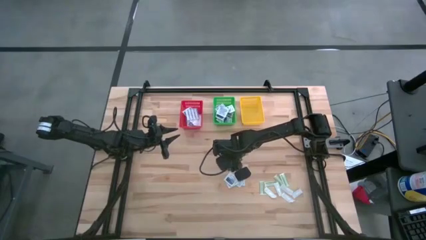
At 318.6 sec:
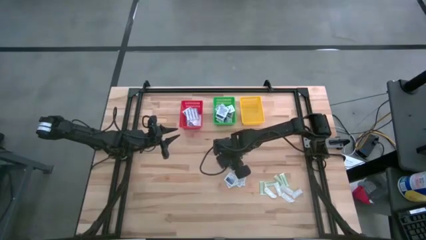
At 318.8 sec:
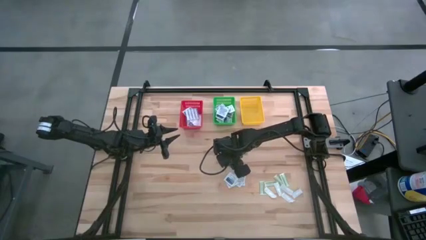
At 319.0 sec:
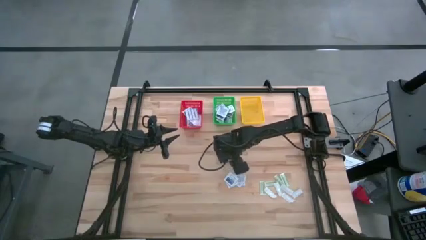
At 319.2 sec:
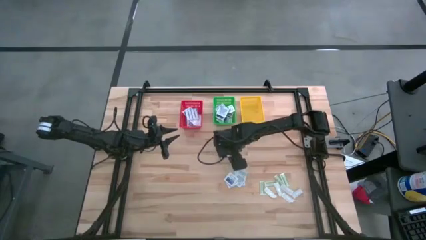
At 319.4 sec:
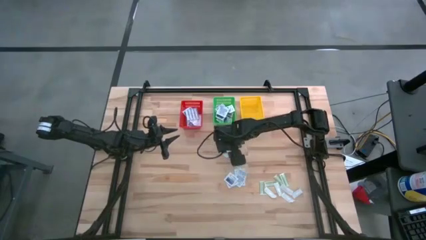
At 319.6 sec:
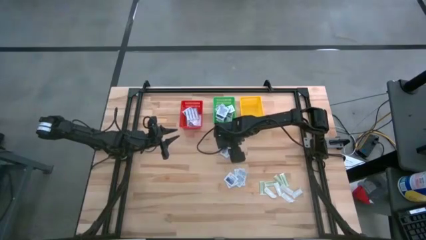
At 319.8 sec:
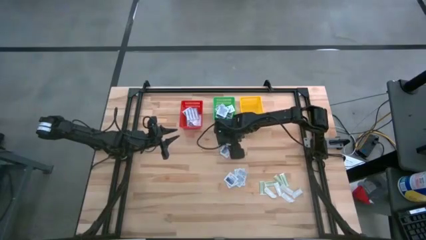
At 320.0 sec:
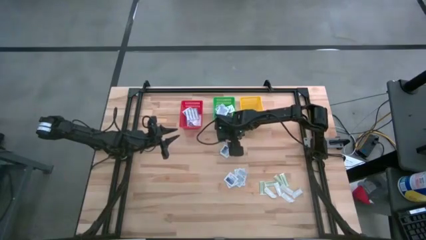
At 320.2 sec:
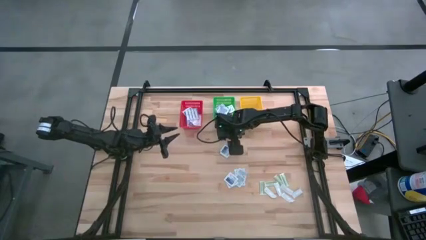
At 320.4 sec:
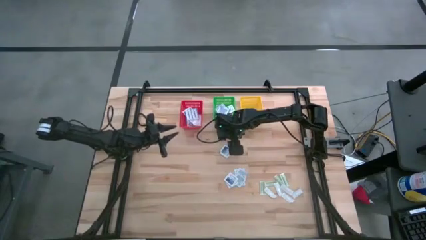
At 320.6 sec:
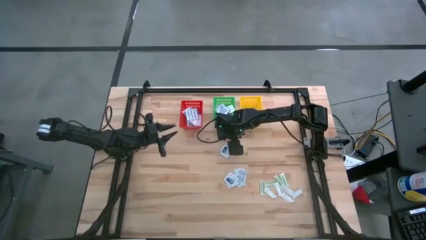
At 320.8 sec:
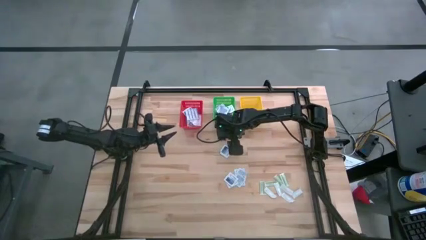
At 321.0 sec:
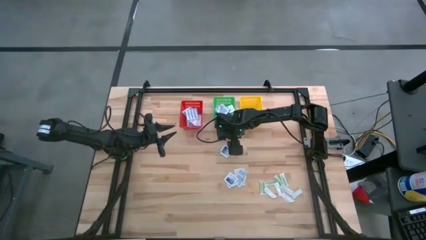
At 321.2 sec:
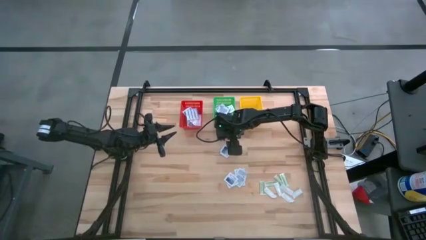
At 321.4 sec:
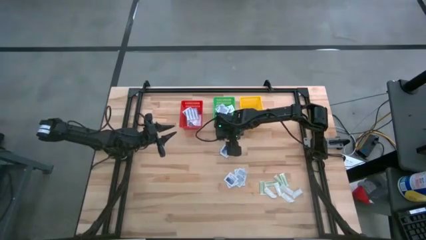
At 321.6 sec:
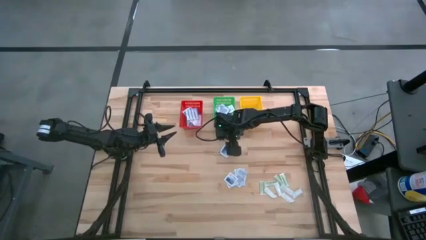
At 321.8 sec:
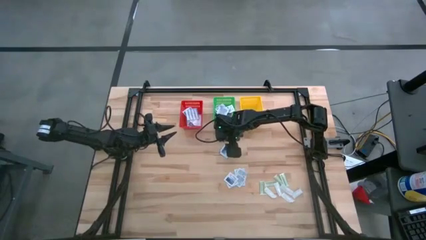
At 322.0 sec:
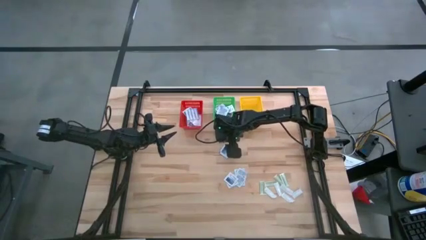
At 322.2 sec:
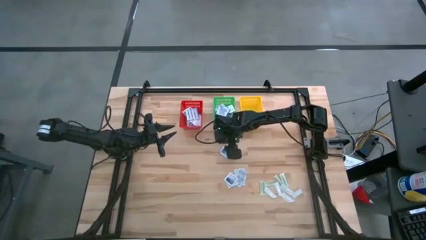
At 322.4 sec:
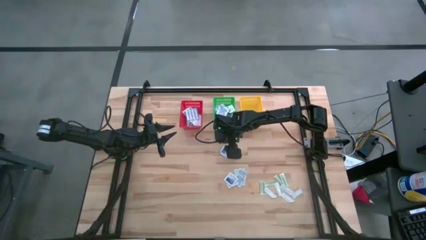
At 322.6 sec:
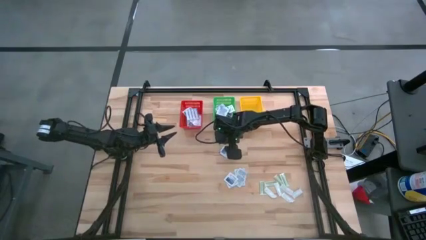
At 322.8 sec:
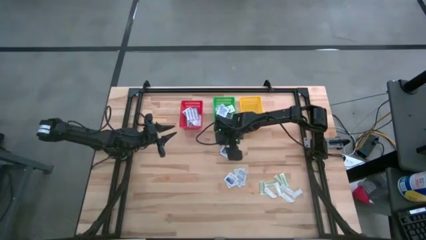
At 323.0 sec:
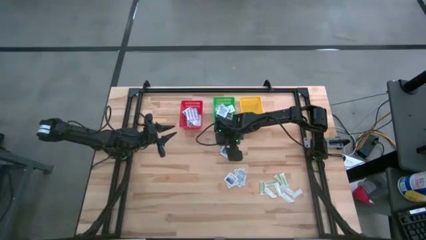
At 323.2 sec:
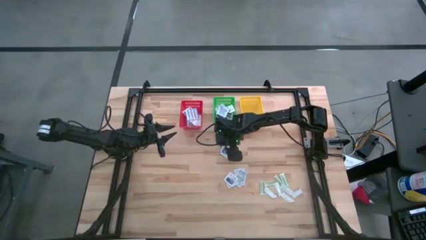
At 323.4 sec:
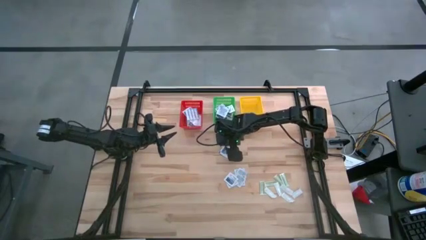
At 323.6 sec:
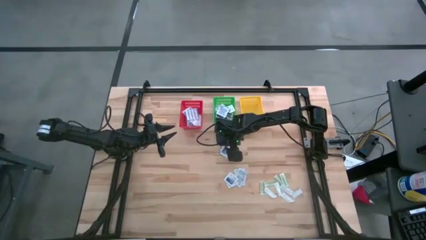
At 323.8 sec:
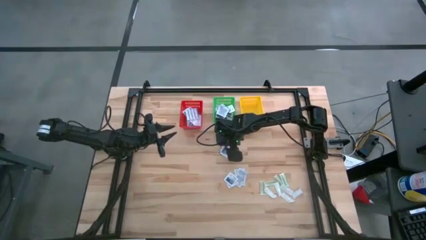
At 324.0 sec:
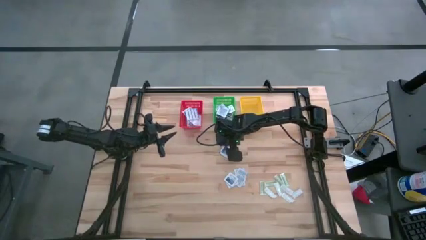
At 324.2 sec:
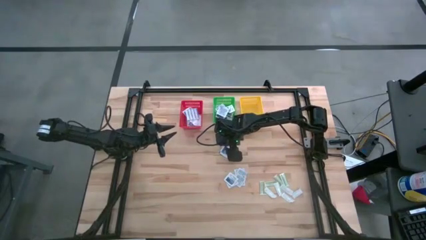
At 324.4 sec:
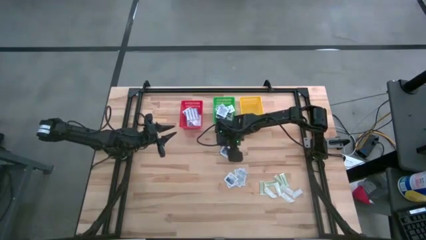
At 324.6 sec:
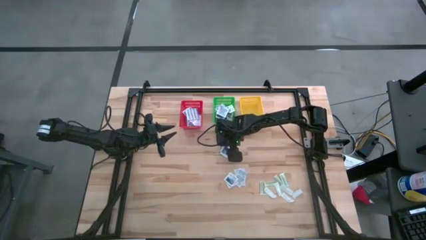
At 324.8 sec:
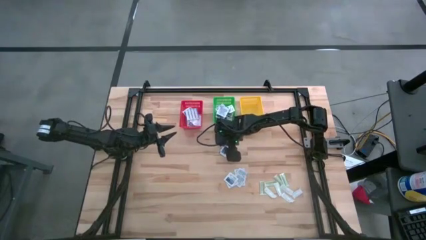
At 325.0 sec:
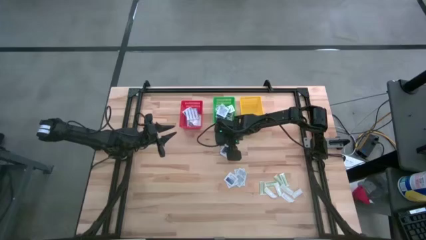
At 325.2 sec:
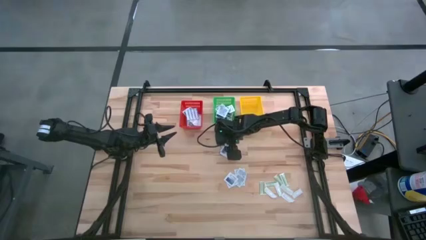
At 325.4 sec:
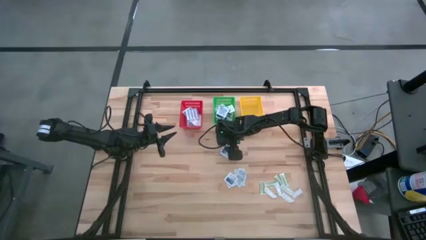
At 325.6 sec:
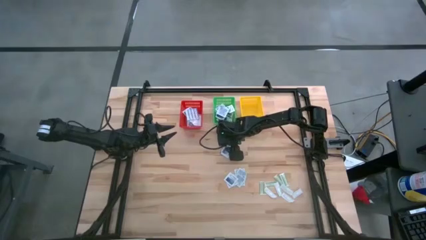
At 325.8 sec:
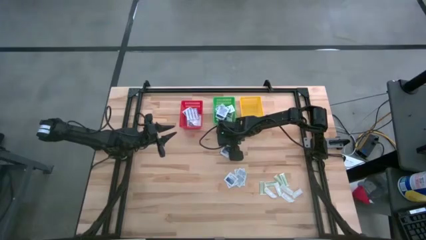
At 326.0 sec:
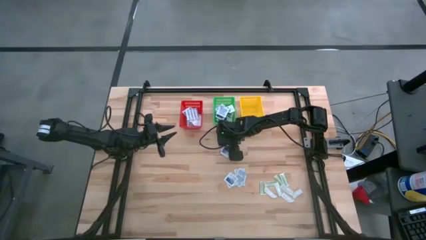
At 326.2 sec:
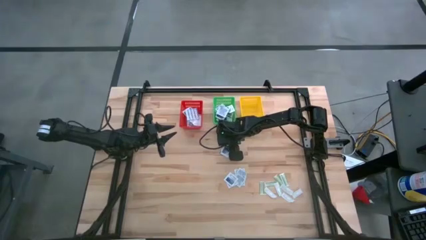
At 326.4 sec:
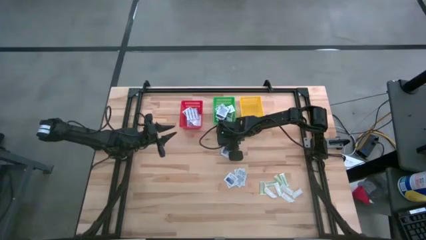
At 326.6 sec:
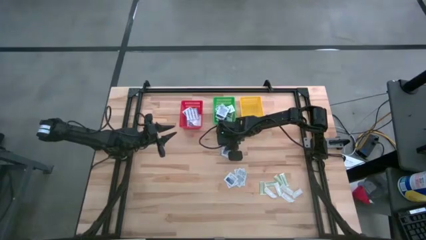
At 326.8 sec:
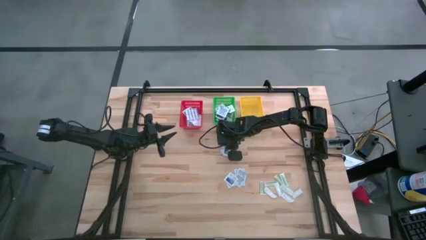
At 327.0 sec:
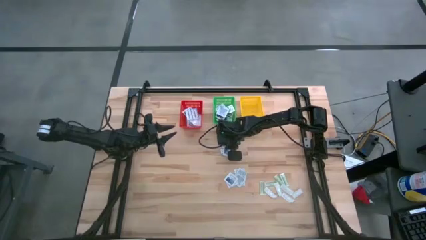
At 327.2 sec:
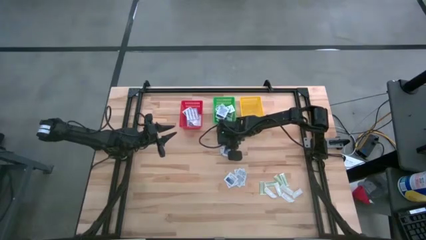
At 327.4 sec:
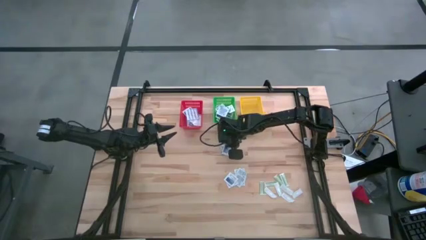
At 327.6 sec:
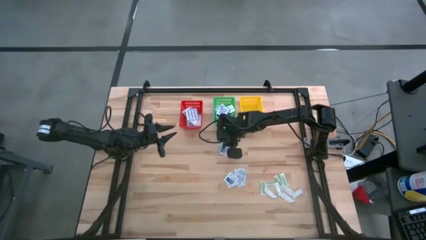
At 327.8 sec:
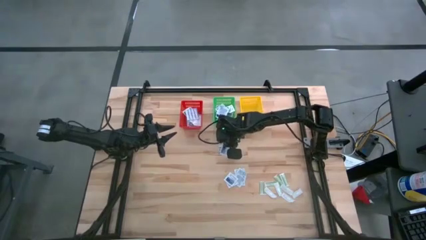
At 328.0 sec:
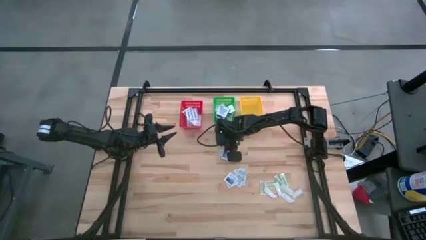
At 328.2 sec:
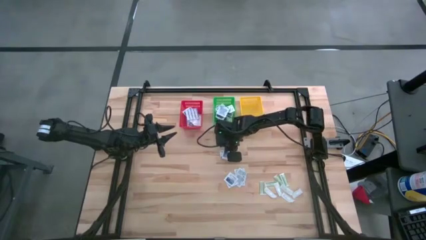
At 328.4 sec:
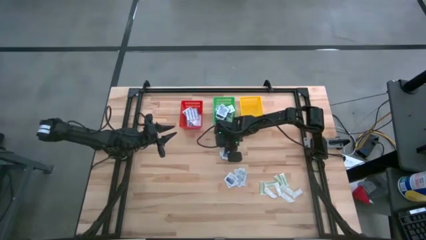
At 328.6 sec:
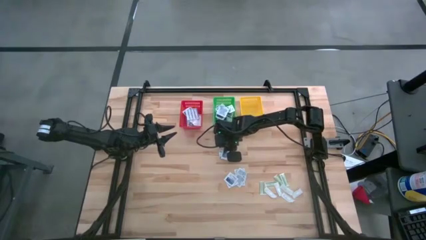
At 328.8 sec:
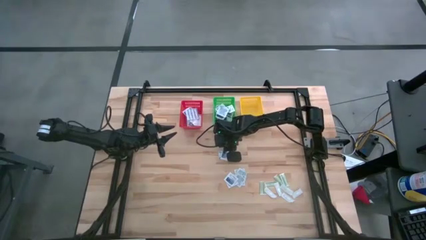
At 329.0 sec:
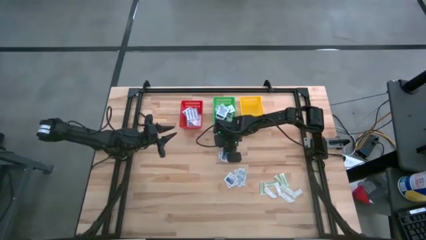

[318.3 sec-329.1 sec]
Task: Pick & Place First Aid Supplies
Put the alcohol pad into the green basket

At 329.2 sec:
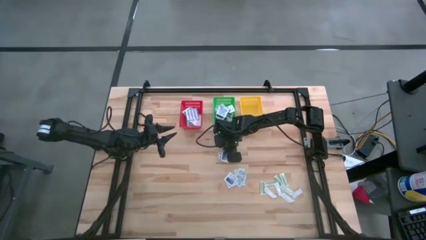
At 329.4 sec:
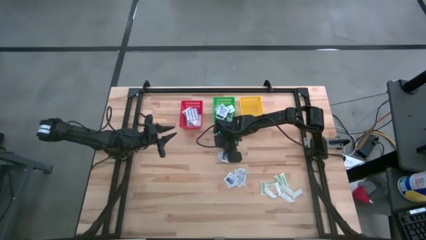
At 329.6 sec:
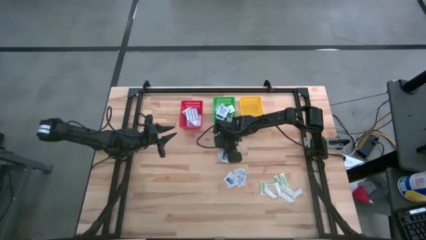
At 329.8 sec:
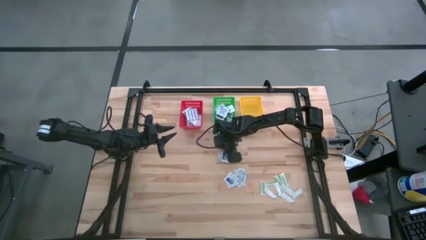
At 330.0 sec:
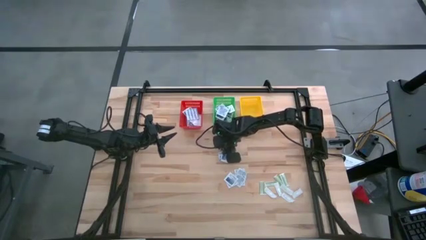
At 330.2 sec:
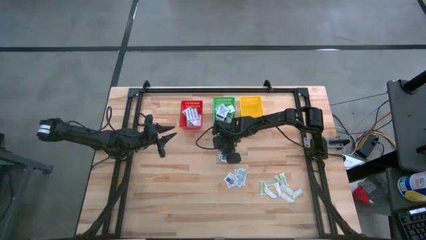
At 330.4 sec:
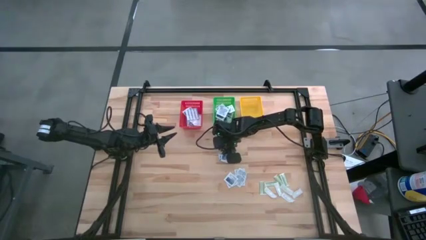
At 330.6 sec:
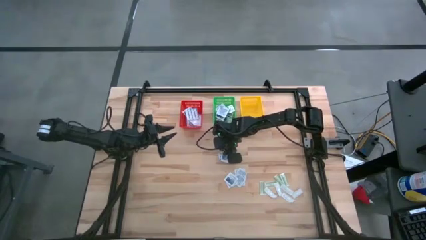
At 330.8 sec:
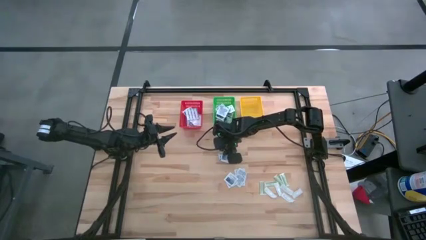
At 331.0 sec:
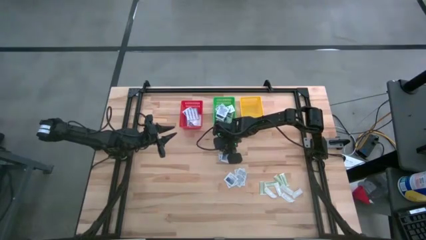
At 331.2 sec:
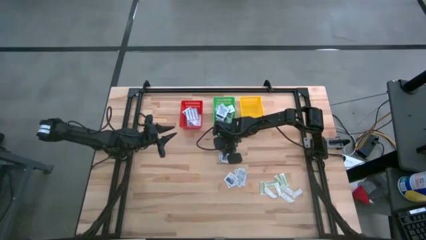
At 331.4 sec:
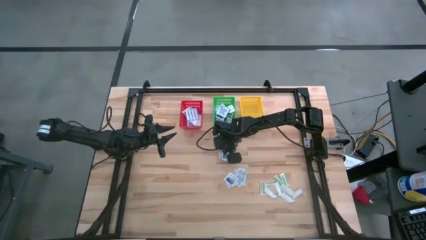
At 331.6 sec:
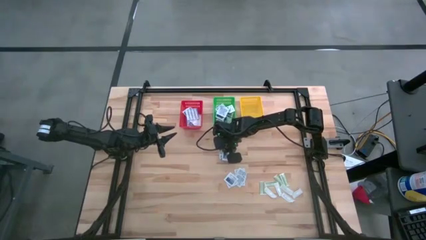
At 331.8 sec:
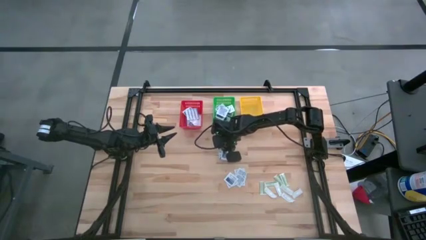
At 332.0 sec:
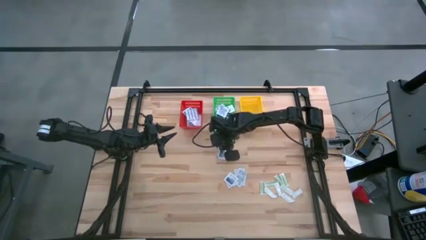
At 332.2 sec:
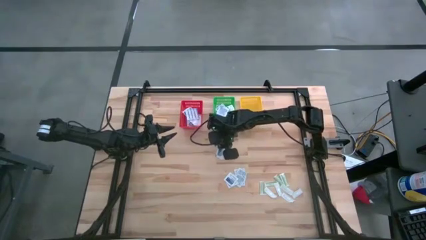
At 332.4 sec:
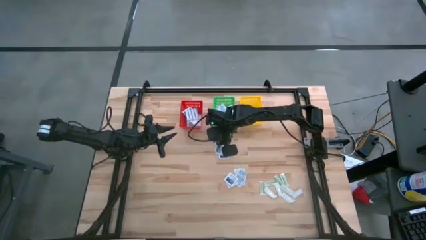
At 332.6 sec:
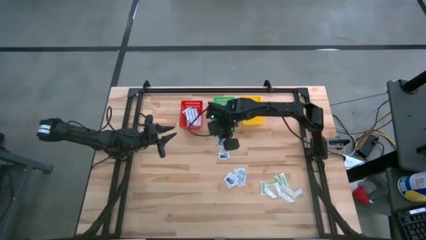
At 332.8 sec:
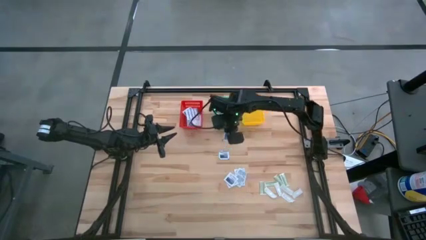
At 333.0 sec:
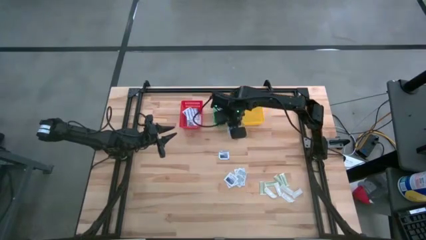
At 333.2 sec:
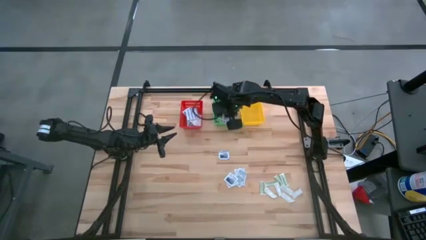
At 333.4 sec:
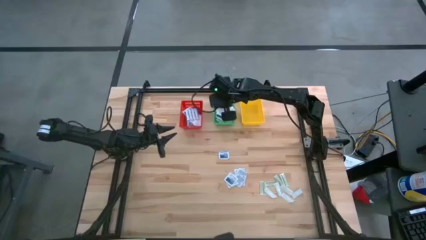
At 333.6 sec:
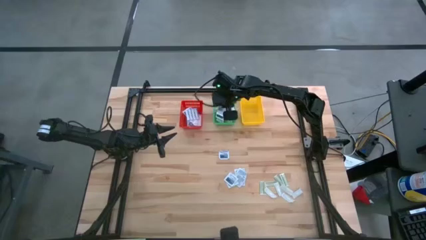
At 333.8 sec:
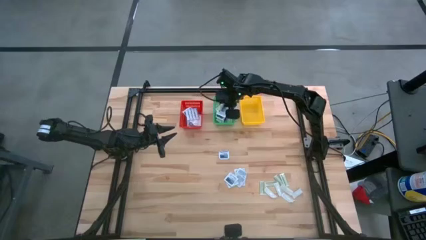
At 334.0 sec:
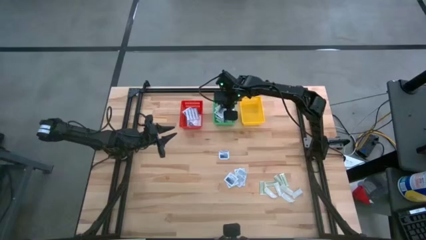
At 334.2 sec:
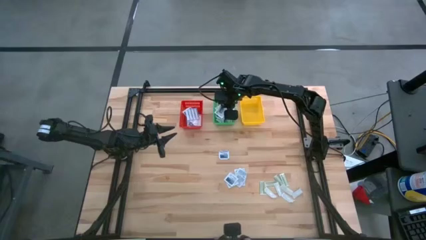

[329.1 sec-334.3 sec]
Put the alcohol pad into the green basket
